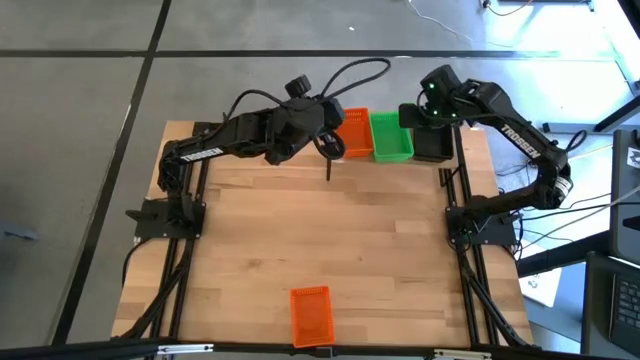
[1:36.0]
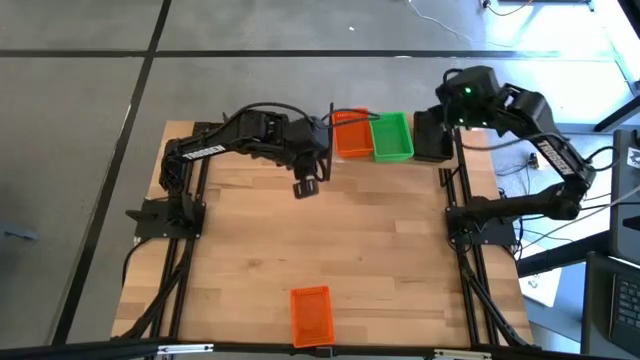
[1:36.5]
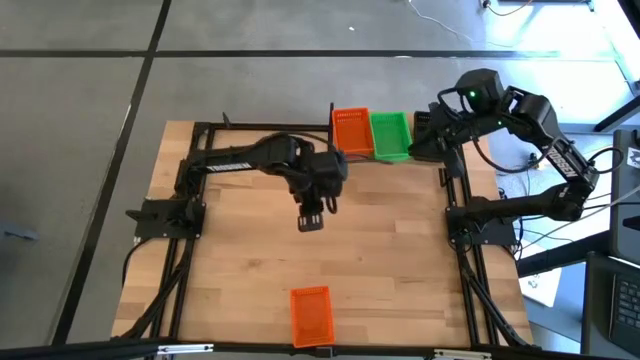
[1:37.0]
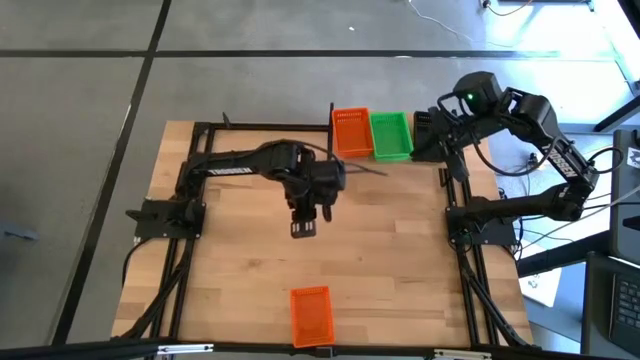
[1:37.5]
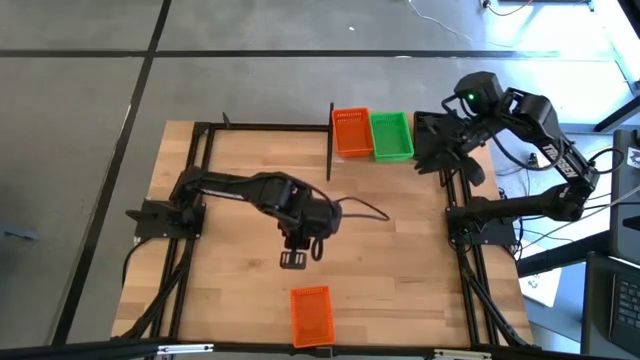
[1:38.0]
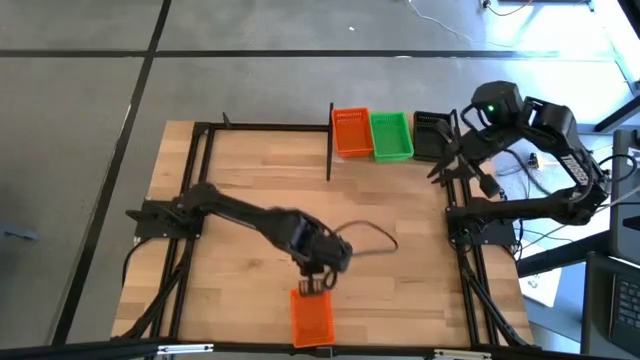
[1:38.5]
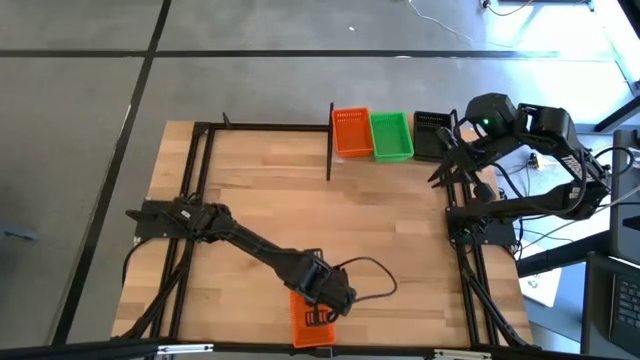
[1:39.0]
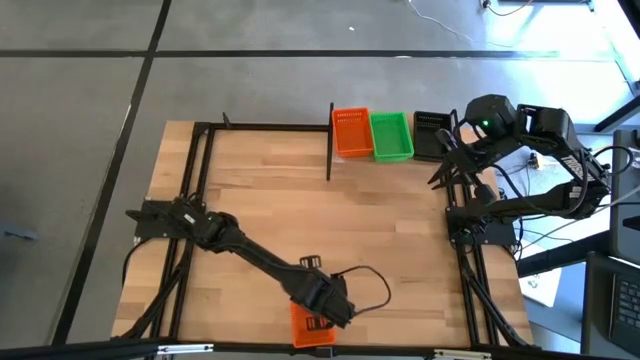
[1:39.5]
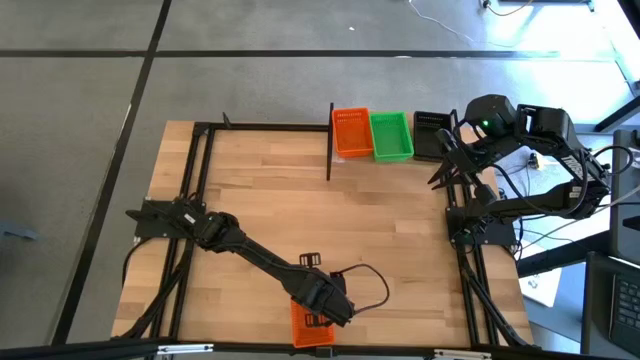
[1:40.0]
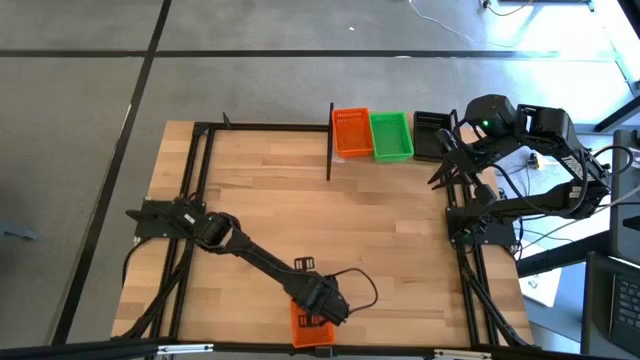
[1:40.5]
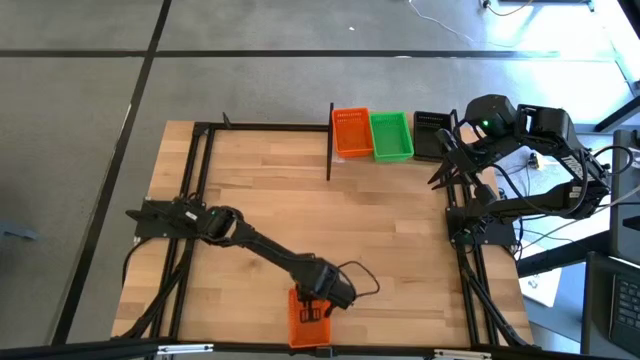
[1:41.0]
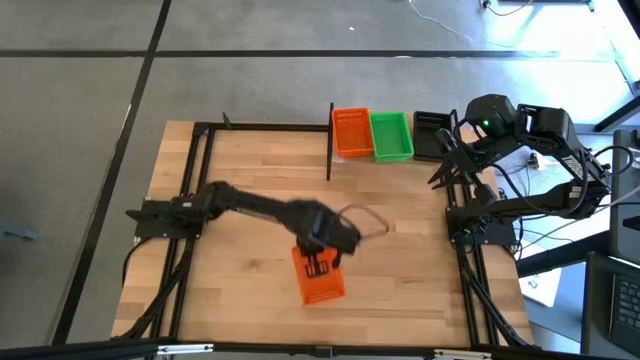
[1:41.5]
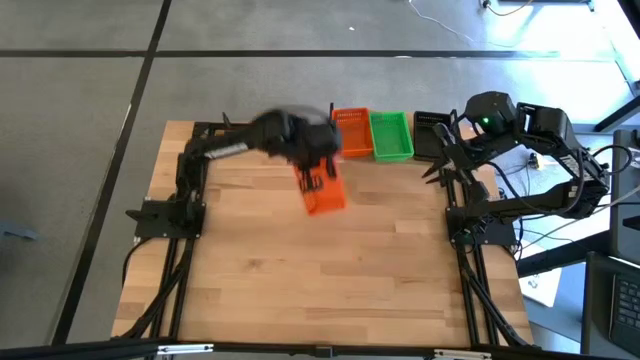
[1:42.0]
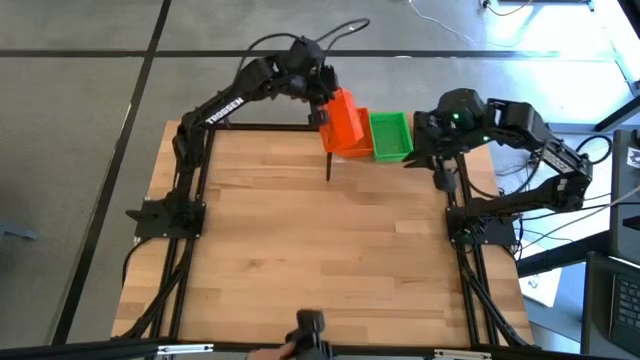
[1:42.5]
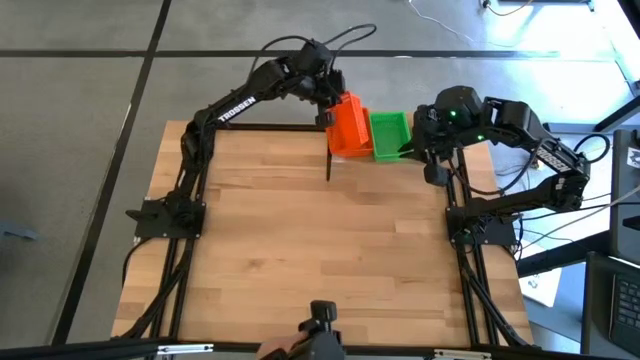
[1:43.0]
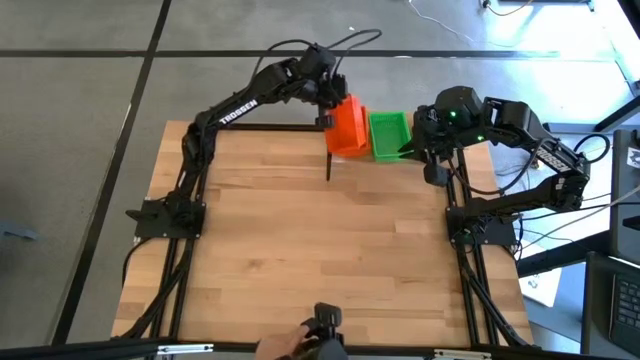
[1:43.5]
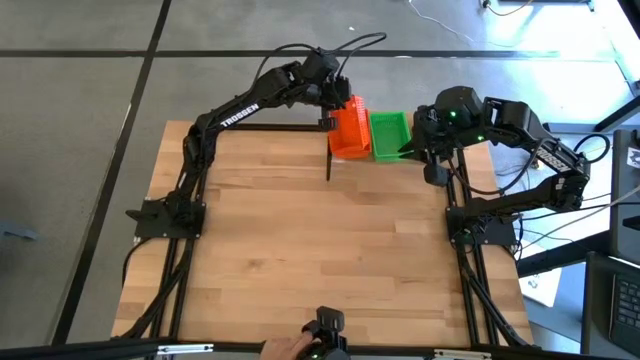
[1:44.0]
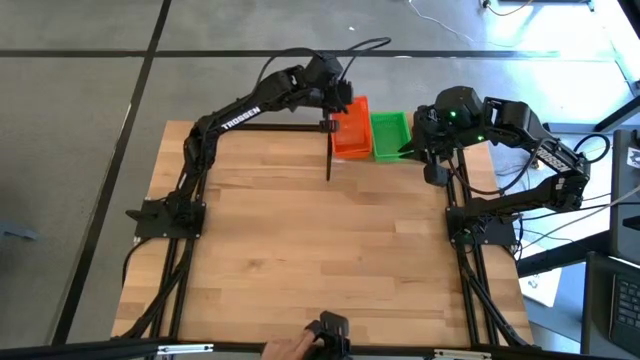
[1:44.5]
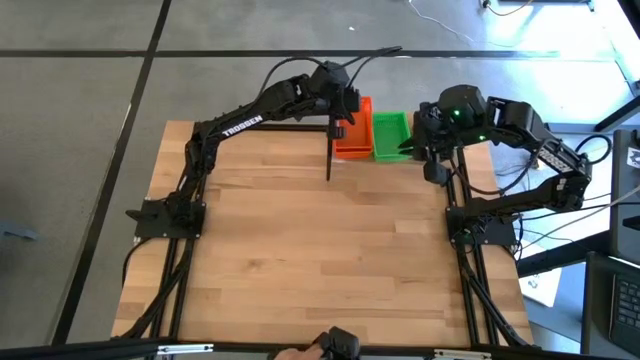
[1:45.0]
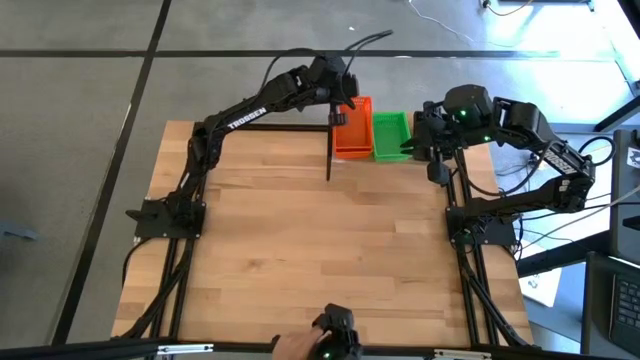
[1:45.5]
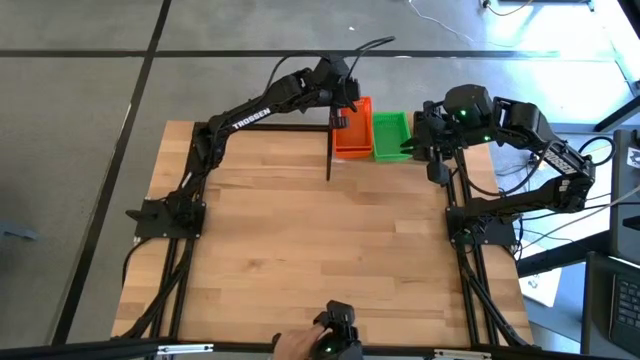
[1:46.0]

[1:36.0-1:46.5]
Task: Stack baskets on shelf by color
Stack the orange bin on top of the orange bins on the shelf

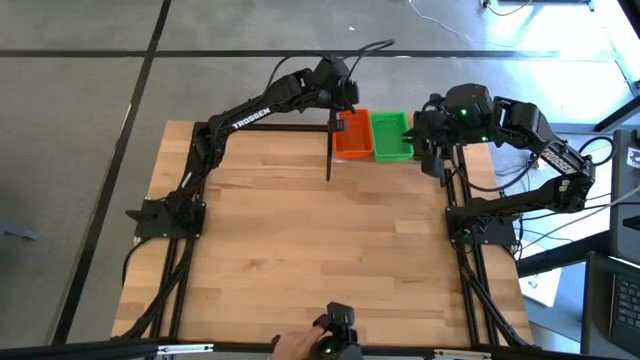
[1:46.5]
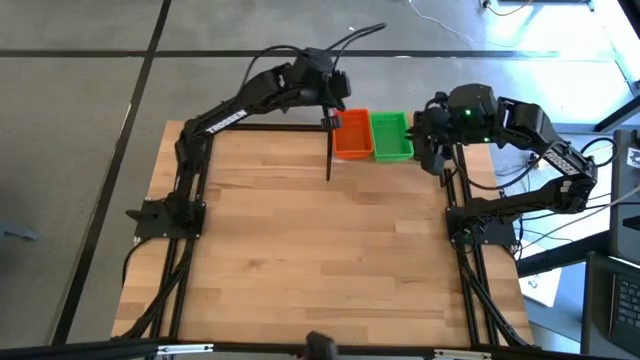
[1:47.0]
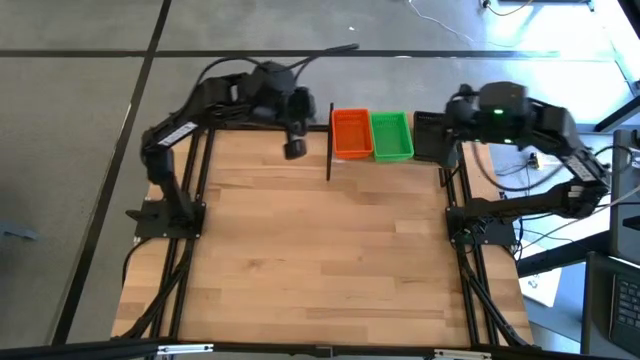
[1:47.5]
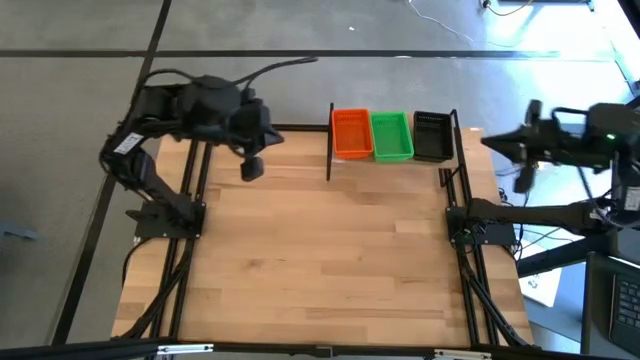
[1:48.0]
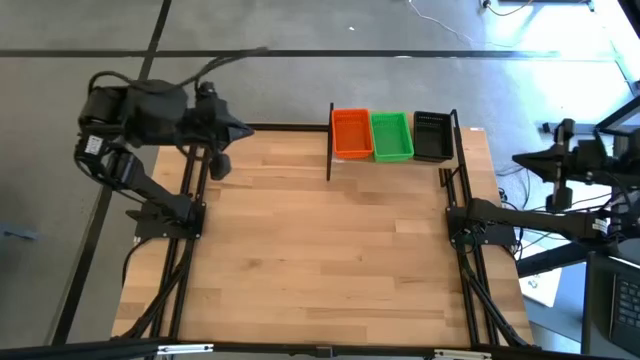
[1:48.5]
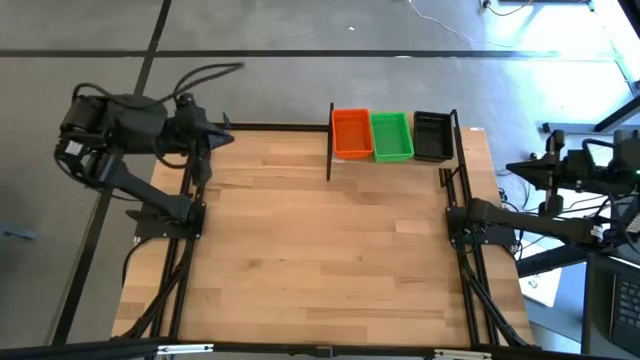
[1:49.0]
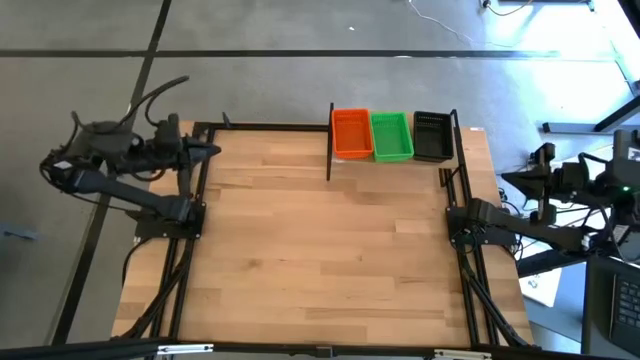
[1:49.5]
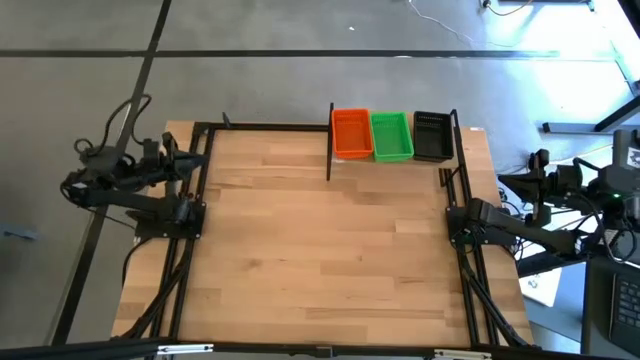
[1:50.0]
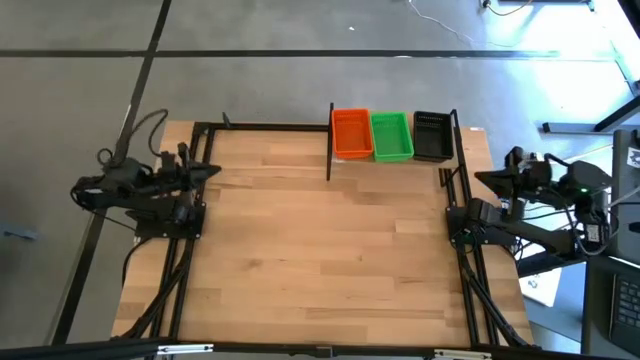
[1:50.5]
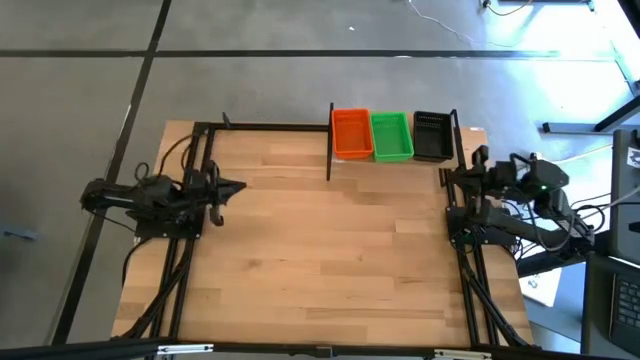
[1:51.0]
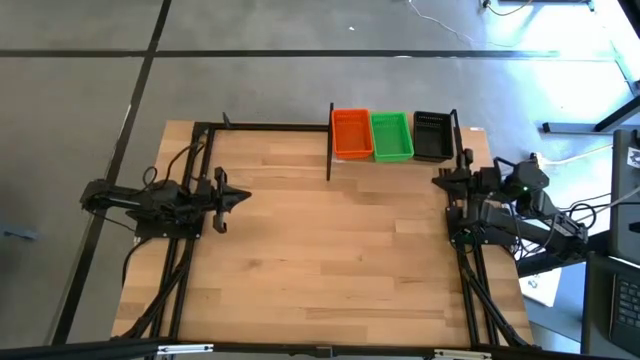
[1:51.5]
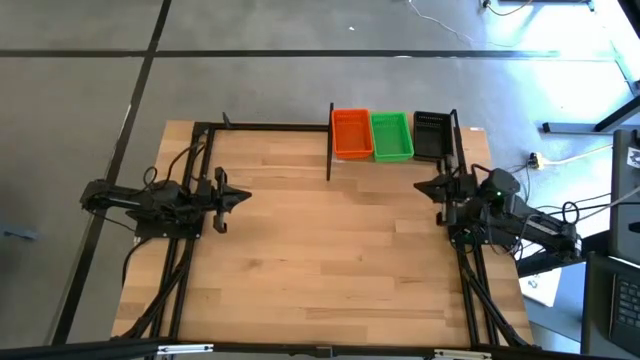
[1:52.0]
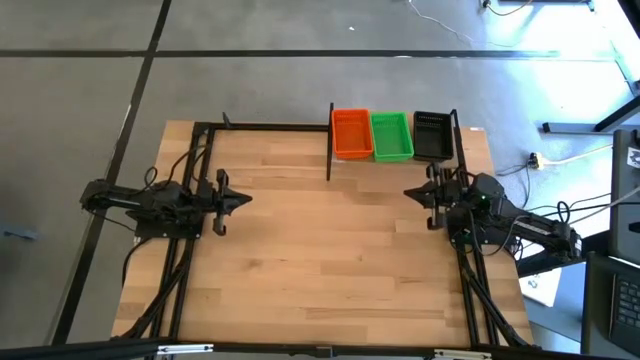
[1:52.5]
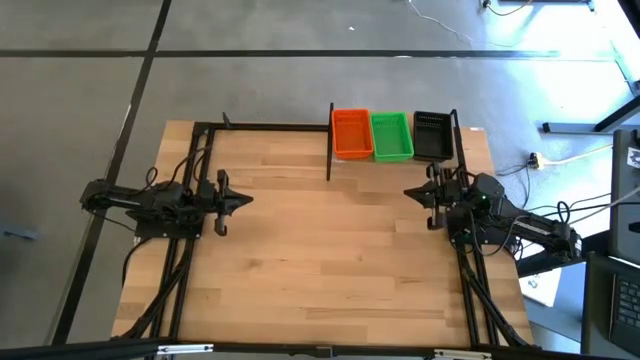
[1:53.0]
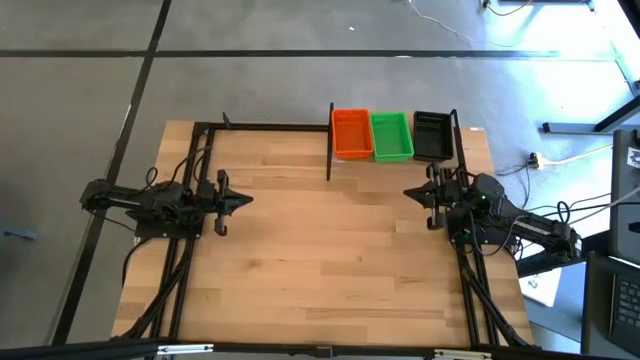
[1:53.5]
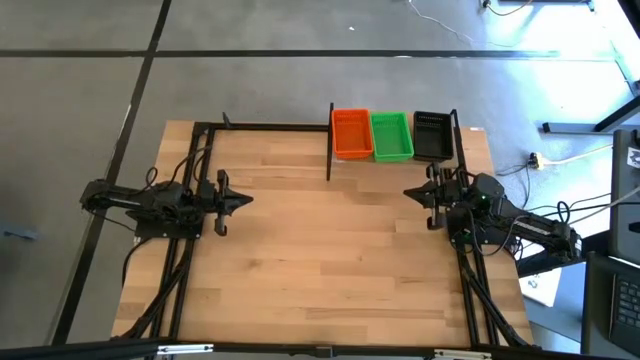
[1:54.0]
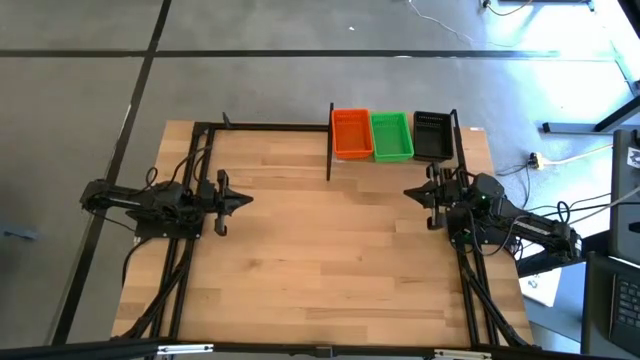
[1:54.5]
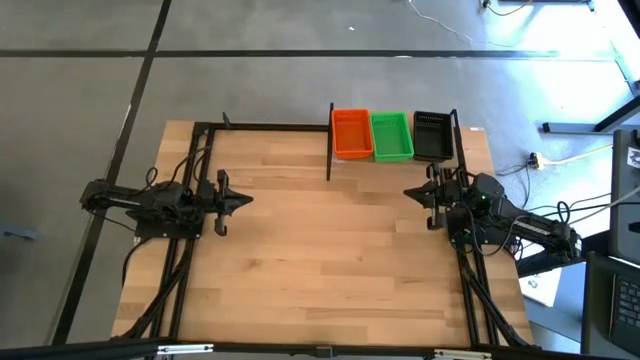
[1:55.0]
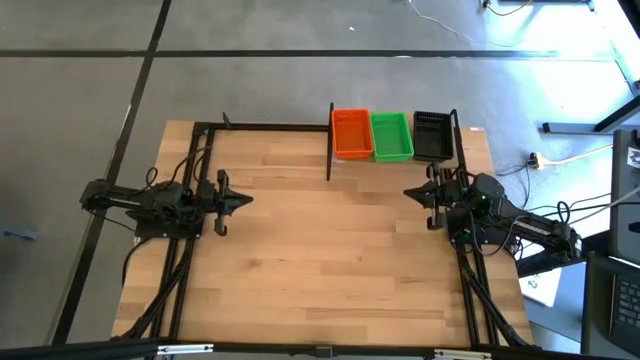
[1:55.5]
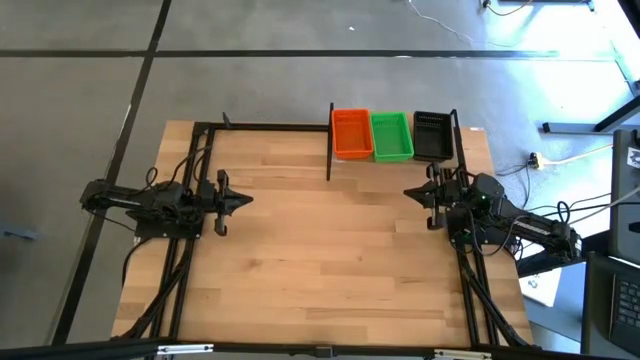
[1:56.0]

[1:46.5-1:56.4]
Return to Home Position

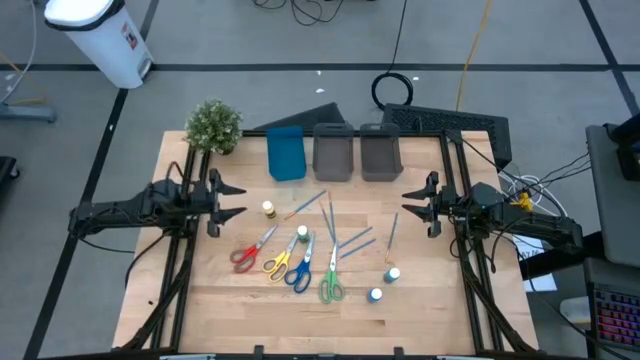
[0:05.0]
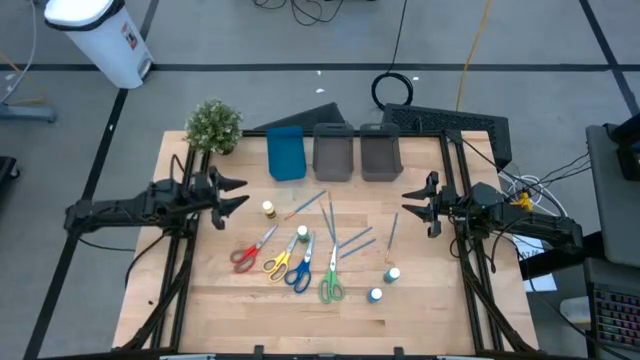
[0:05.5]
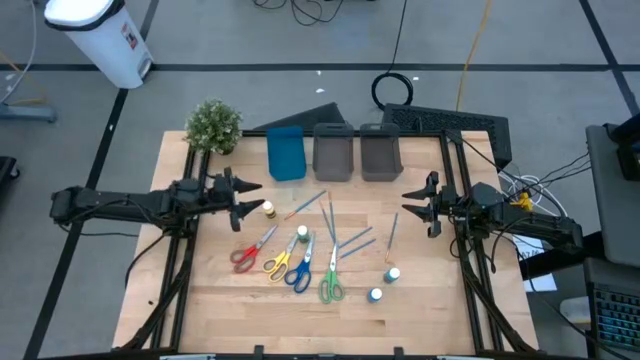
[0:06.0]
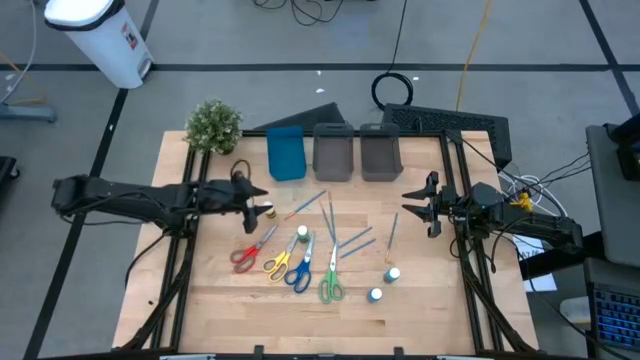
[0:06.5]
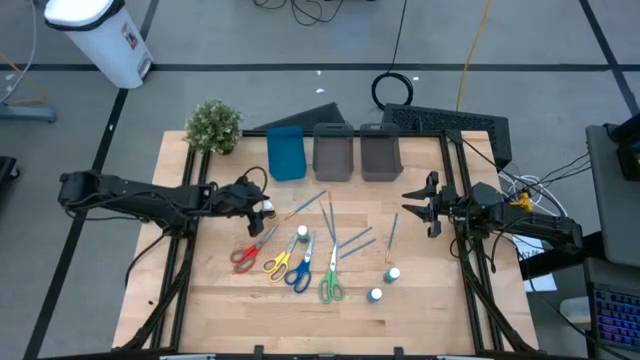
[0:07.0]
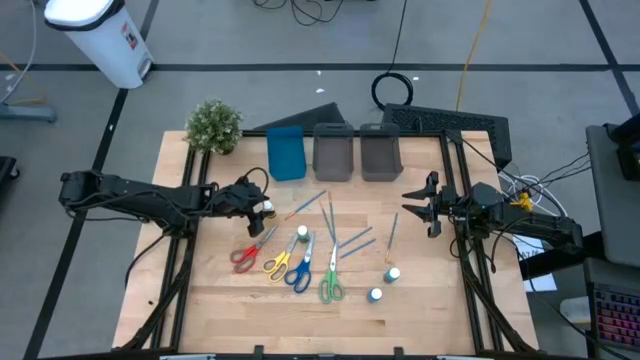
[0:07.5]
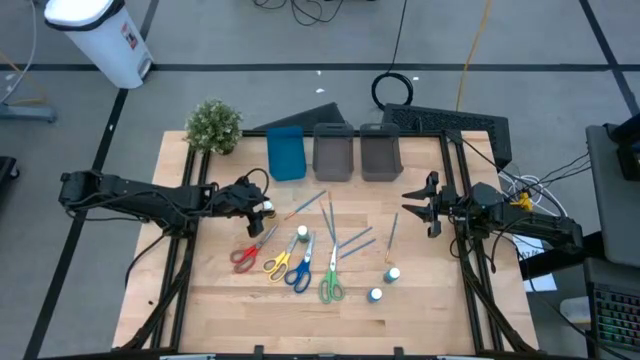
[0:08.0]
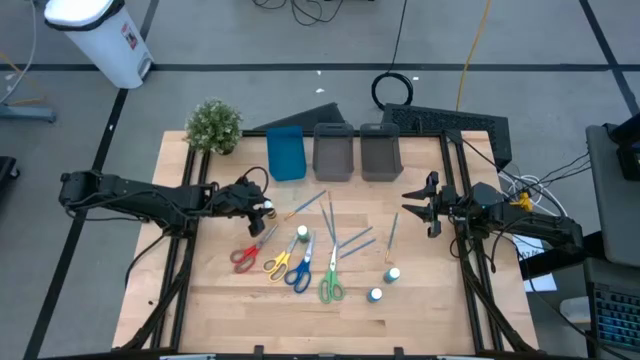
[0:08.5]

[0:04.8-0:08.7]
Task: Pick & Place Paint Supplies
Put the yellow paint into the blue bin
